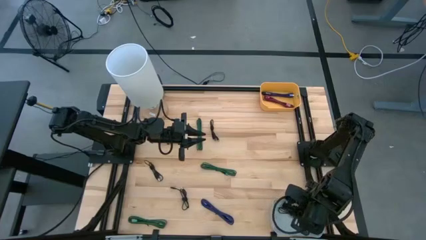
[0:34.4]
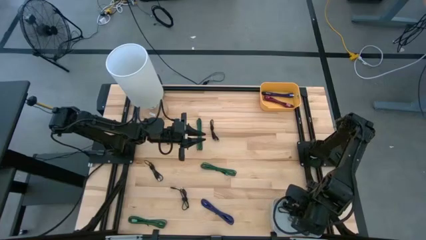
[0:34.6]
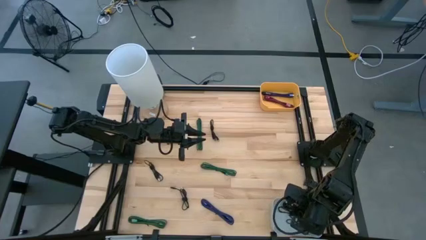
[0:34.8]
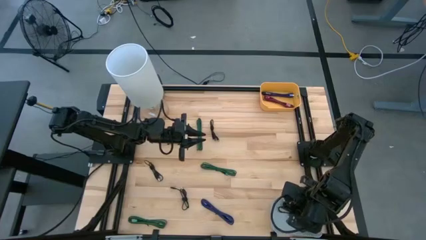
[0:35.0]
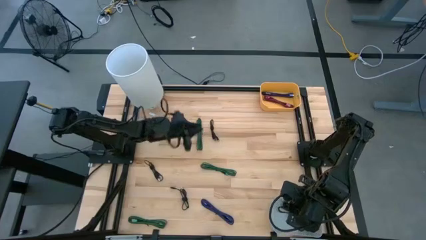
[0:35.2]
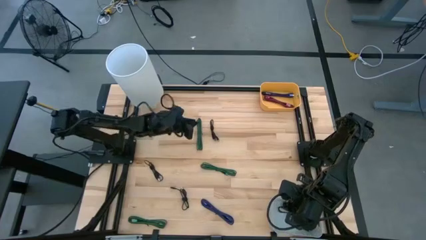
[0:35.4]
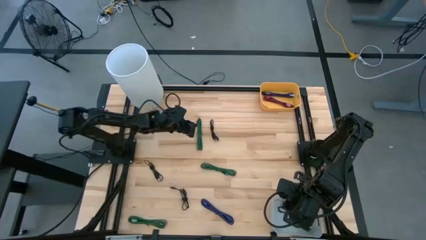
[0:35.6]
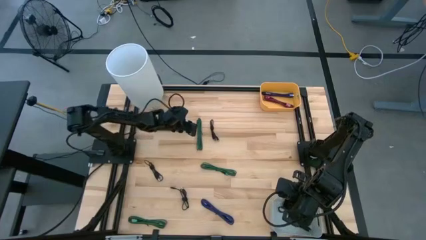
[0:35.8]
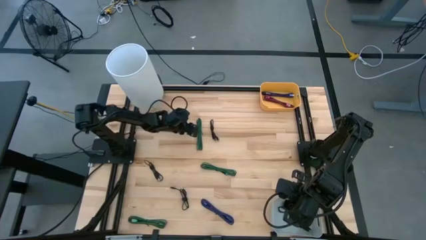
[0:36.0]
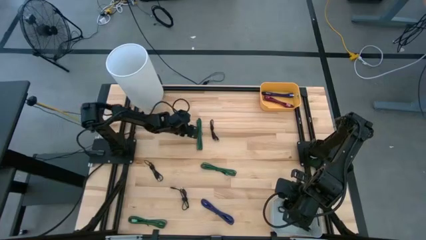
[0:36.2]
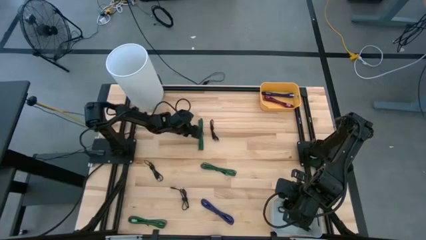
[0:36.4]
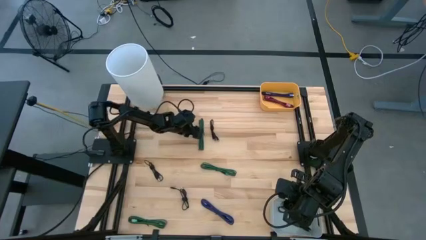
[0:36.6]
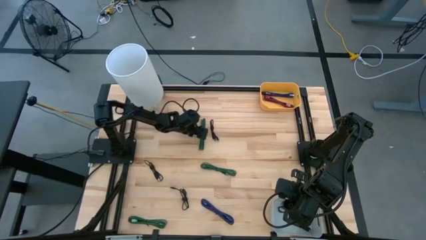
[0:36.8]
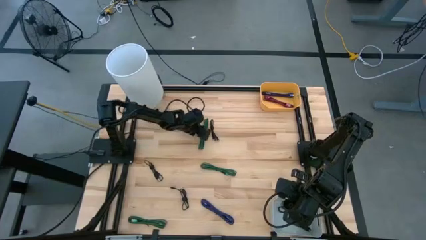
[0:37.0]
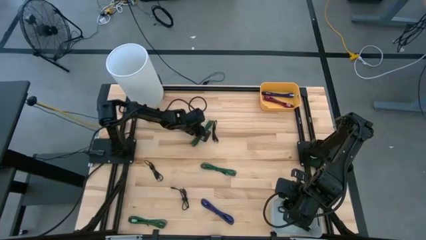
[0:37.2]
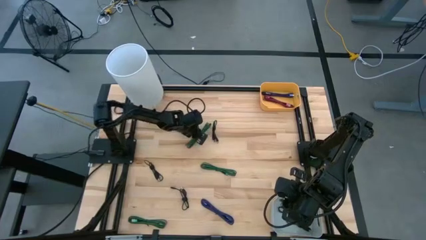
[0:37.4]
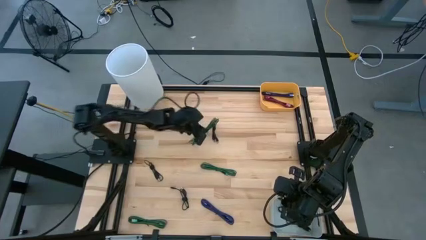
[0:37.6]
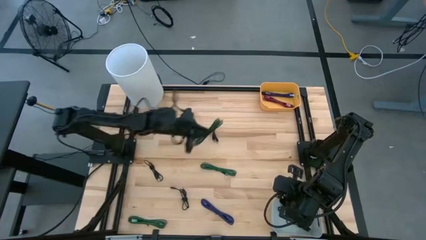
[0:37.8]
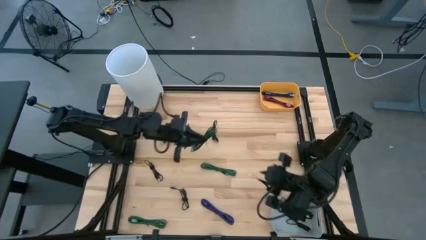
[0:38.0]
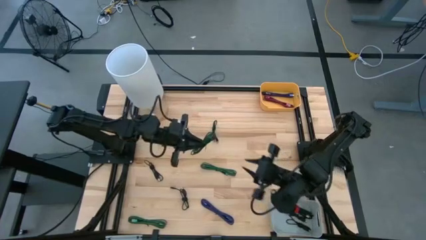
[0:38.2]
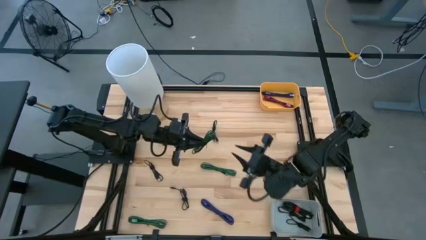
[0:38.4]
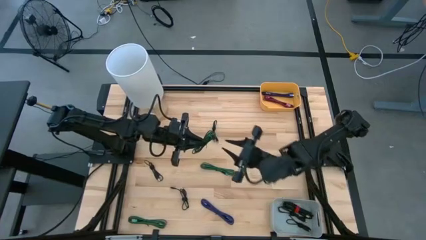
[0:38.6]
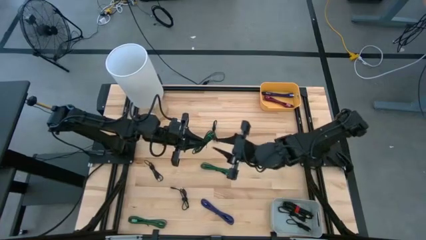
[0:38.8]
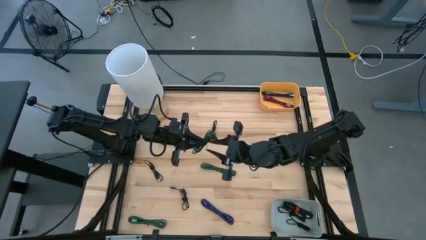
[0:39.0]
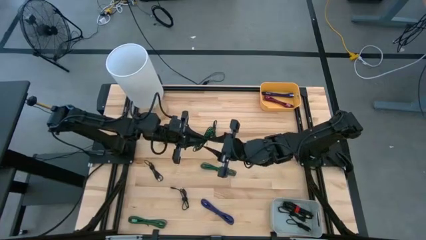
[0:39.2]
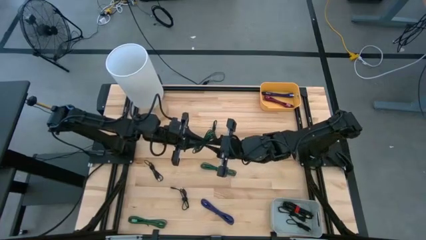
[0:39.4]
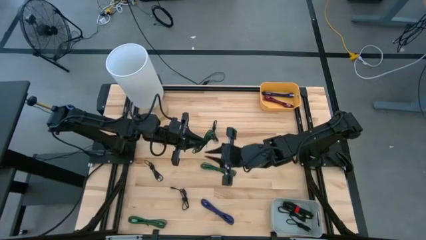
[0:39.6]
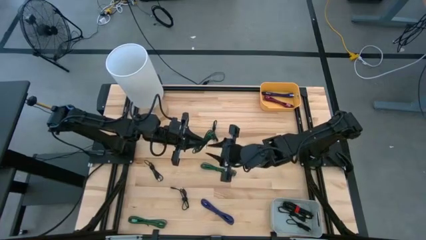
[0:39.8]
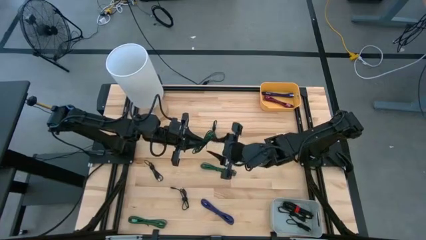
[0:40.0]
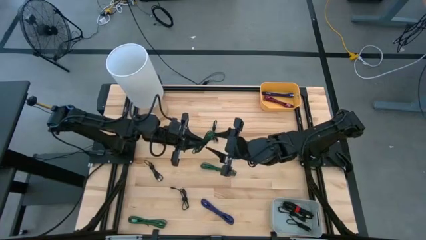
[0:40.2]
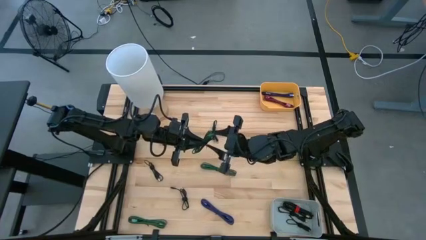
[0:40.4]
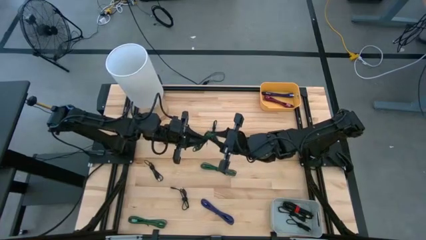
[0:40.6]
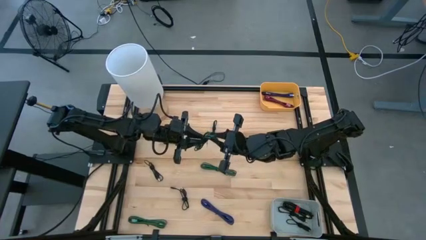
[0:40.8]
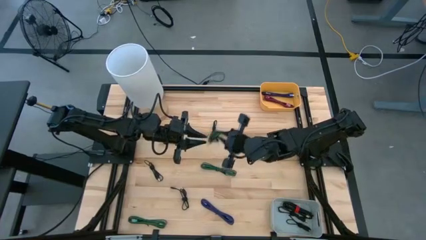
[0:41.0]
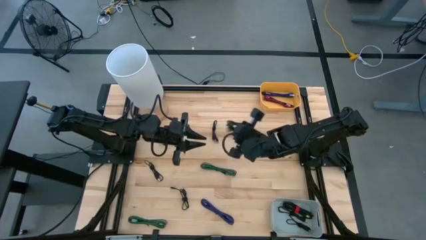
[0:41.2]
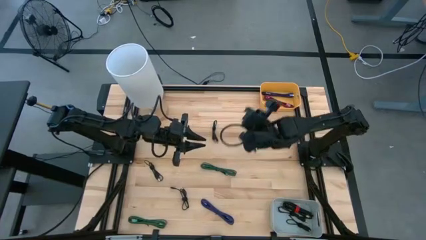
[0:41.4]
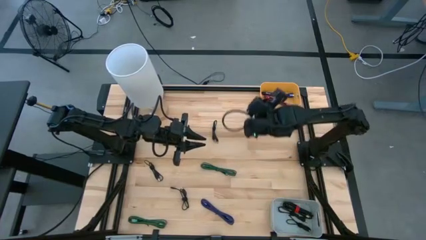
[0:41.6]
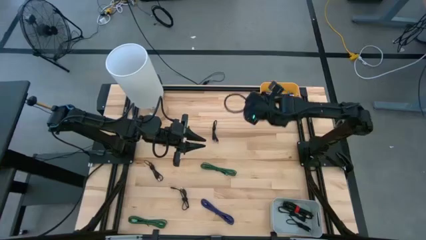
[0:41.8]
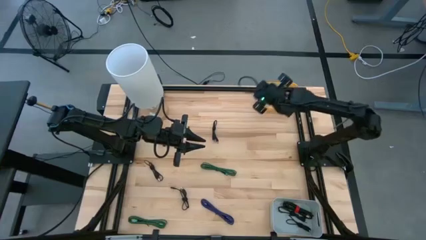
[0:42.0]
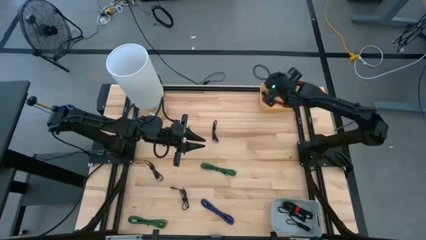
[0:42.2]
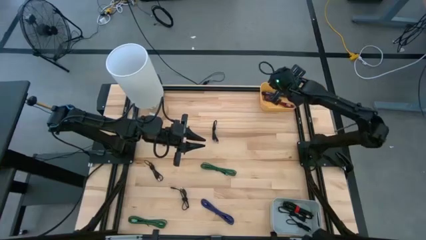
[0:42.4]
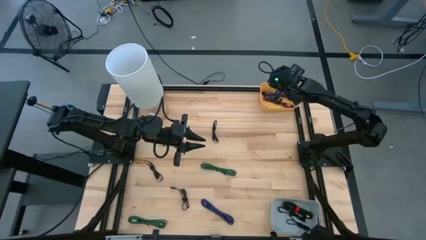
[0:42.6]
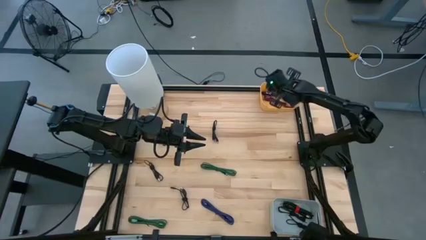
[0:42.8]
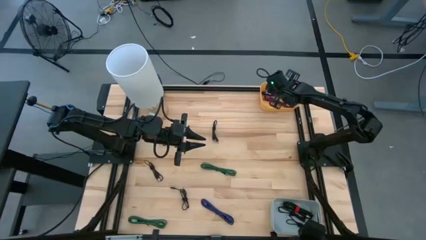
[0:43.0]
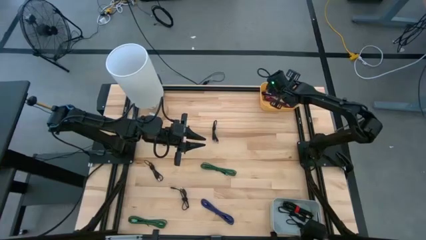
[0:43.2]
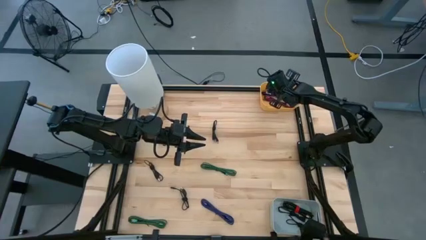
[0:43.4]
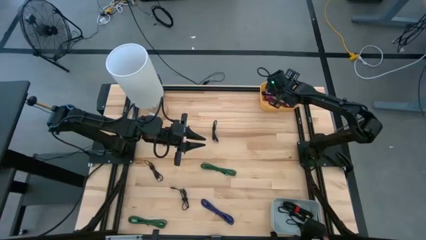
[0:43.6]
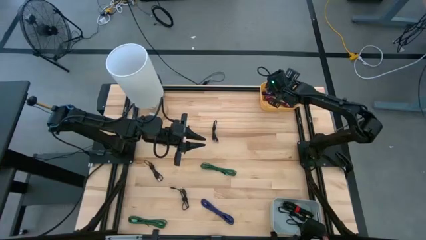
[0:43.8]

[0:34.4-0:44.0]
Task: Pick & Place USB Port
Put the black and green USB cable into the yellow bin

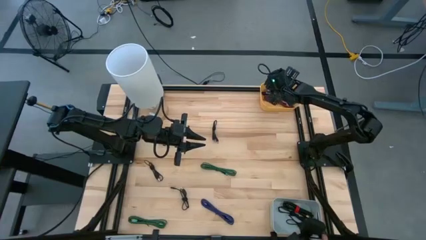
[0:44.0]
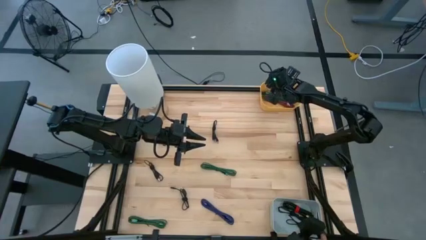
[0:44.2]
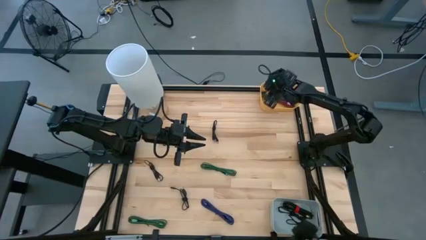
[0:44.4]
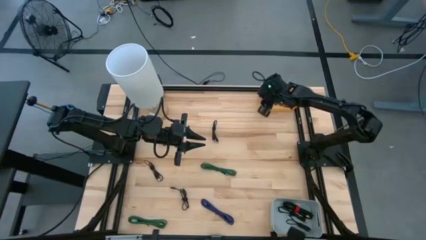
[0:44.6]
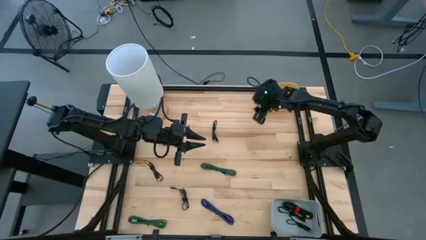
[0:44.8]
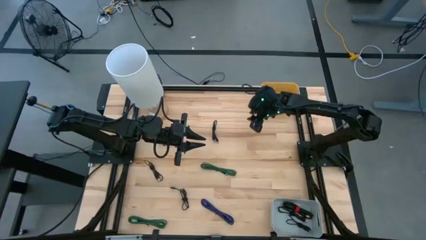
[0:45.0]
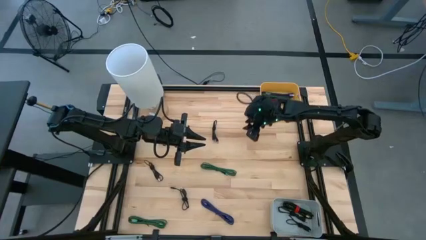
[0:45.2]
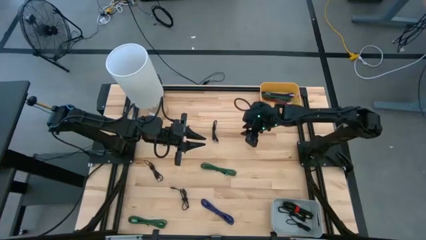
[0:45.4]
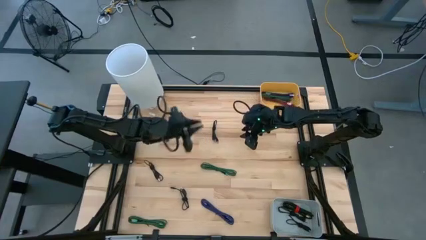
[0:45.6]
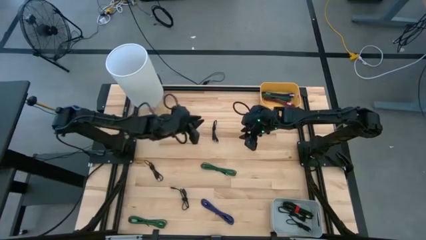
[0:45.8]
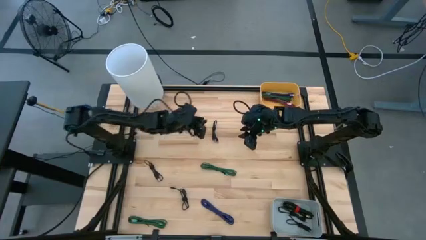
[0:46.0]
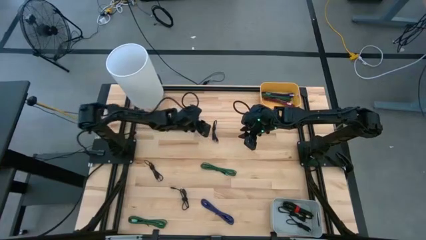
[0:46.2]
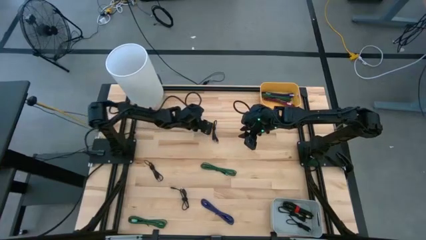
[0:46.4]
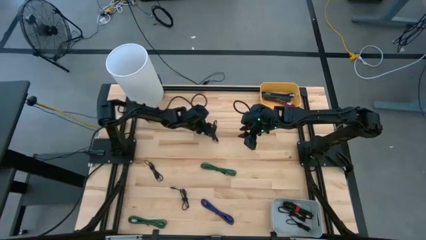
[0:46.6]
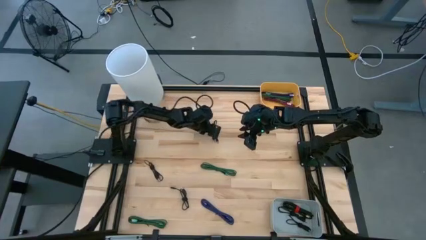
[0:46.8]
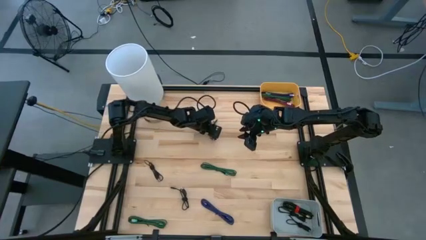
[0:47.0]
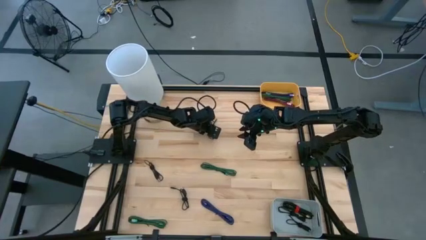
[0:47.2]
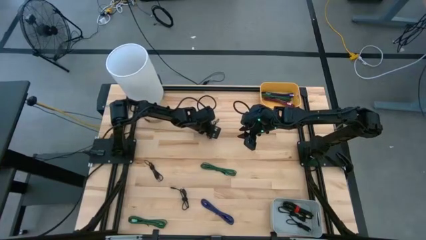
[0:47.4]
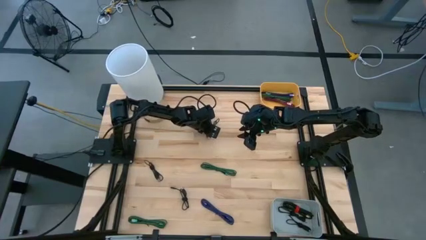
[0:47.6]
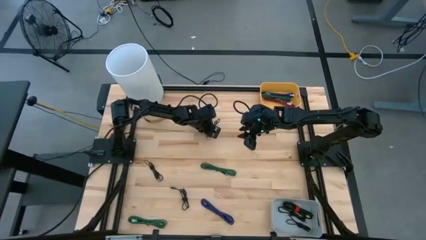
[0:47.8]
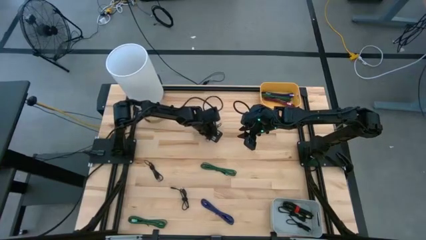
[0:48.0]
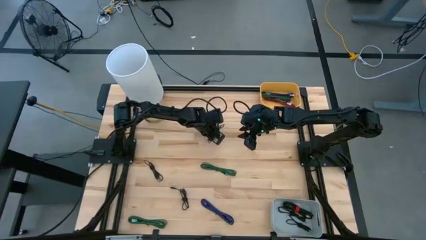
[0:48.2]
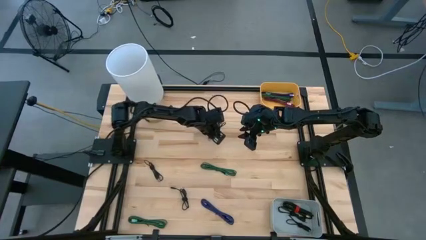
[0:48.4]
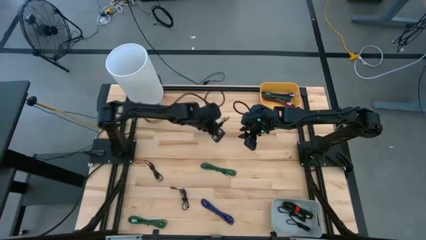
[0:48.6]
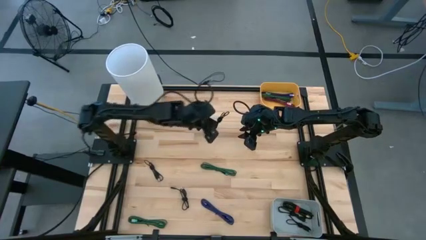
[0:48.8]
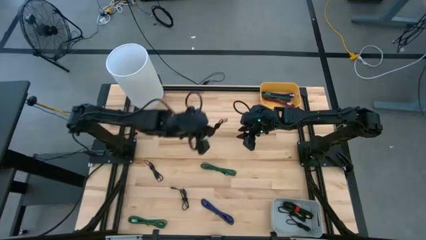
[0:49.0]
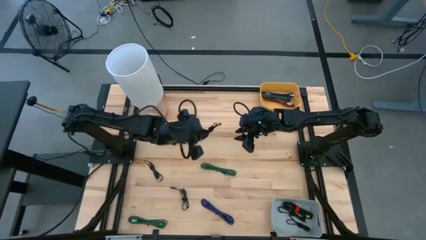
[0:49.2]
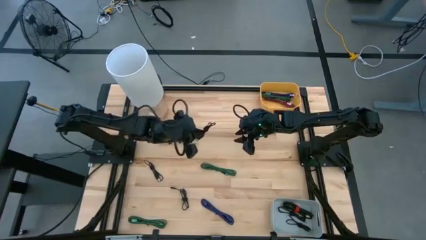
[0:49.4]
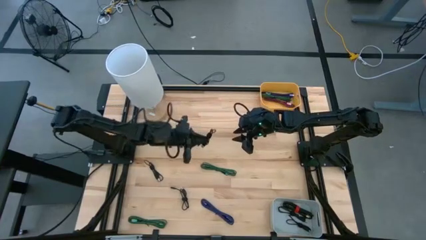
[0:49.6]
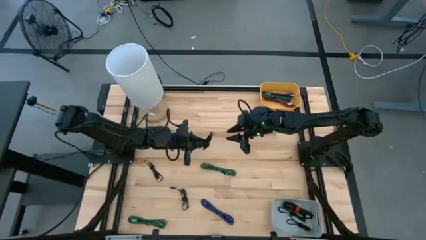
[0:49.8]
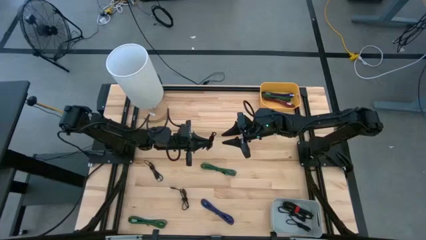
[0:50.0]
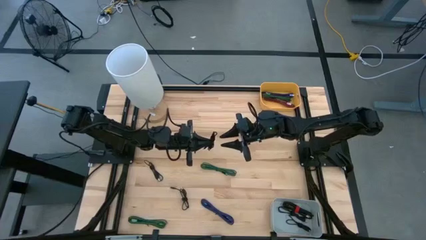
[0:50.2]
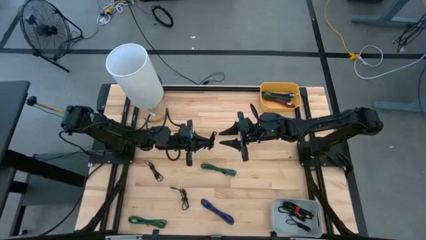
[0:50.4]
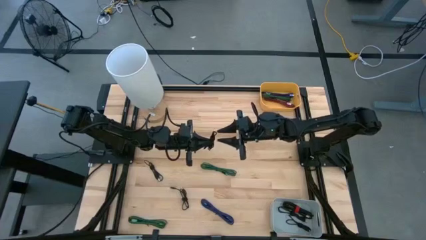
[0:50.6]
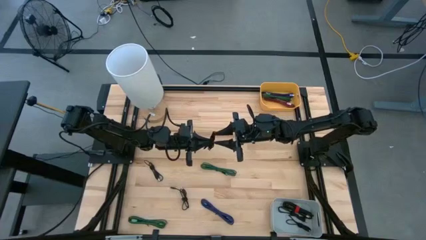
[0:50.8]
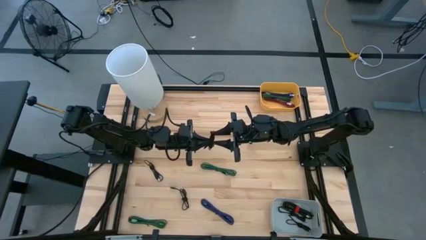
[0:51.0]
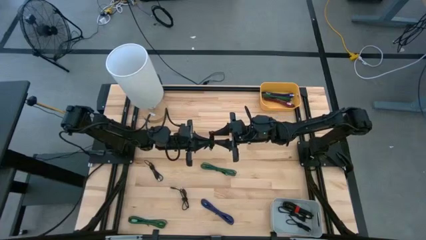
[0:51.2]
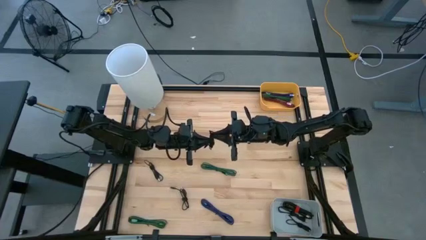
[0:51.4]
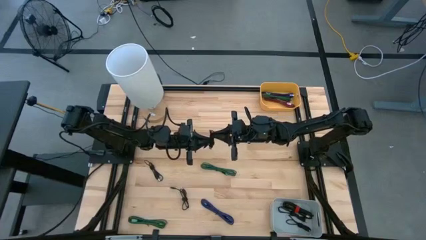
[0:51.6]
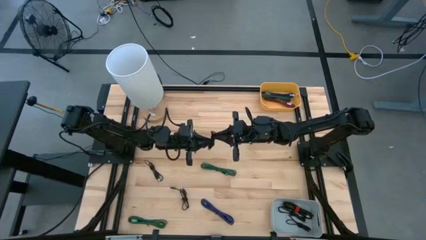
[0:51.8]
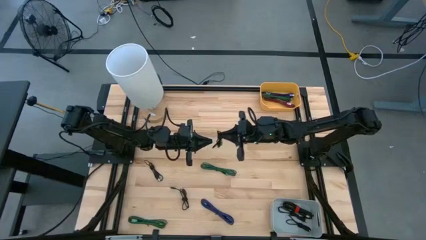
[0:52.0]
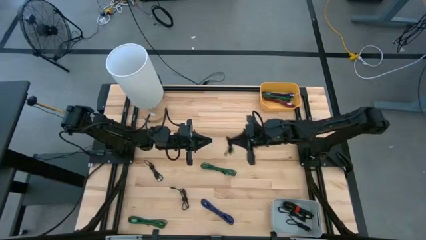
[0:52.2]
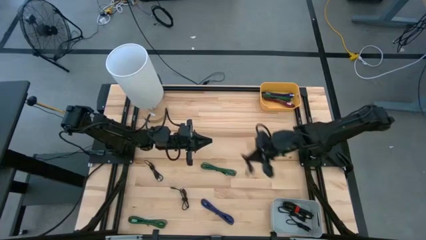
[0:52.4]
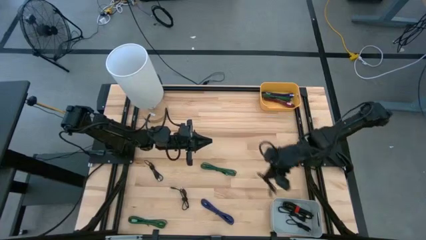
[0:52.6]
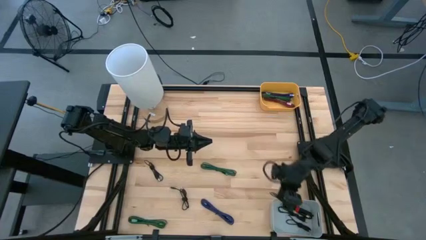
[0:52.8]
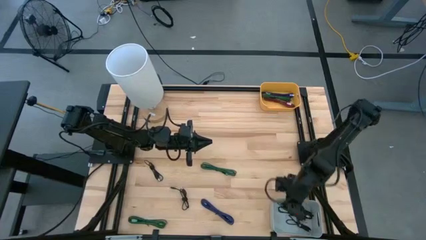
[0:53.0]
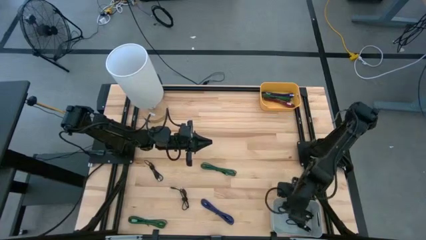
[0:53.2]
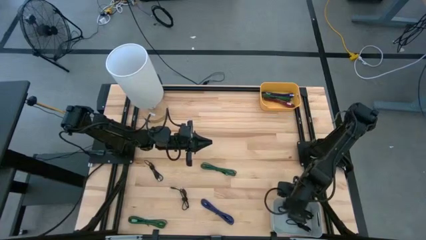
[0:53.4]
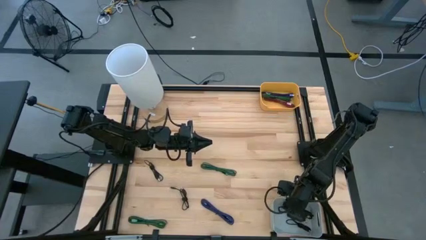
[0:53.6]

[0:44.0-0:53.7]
Put the black USB cable into the gray bin
